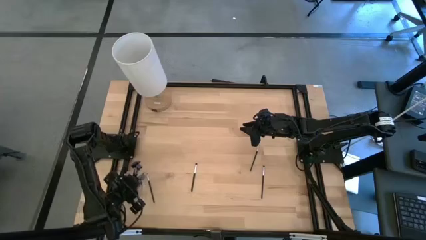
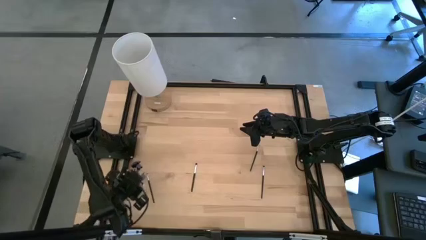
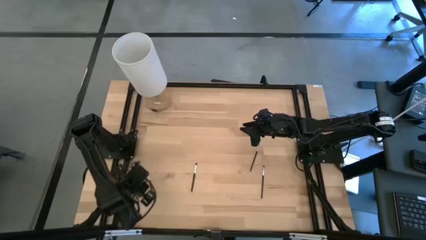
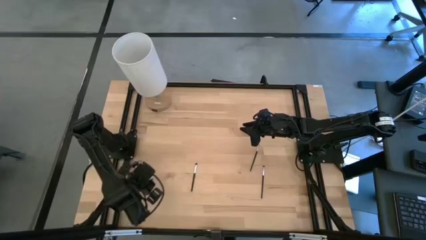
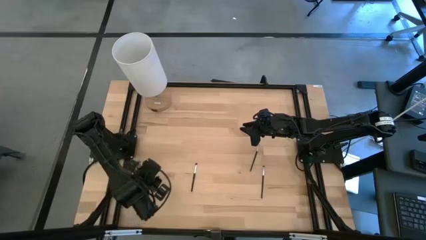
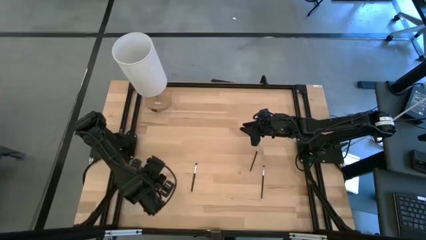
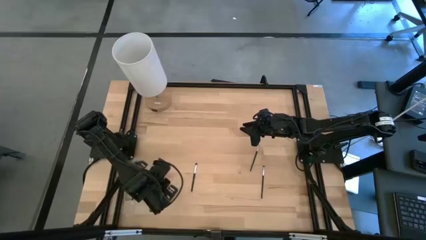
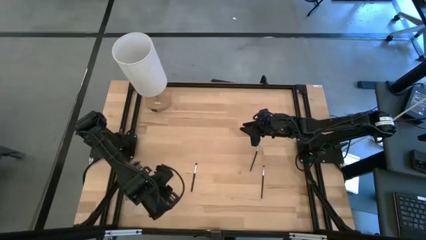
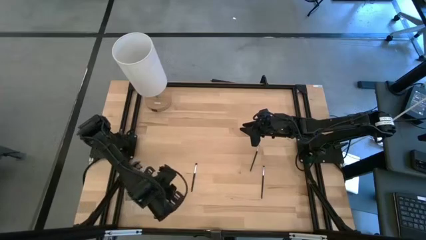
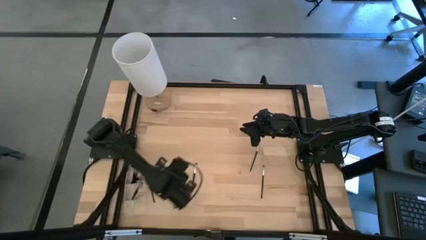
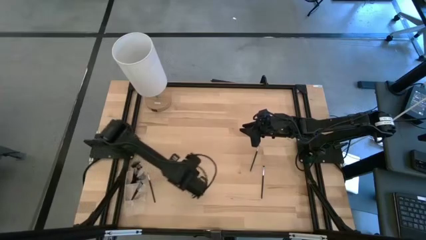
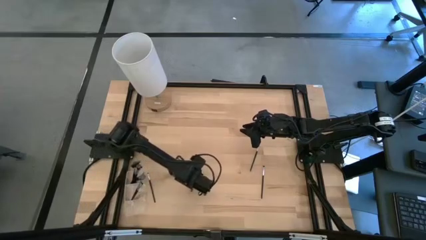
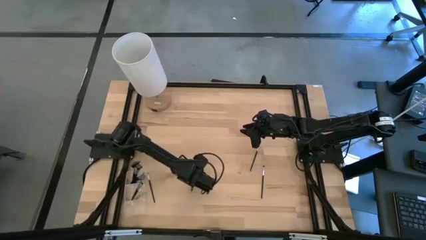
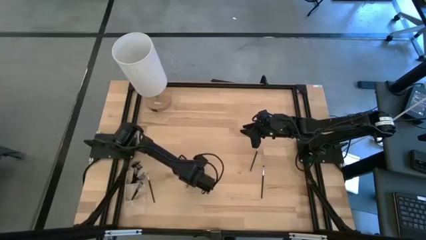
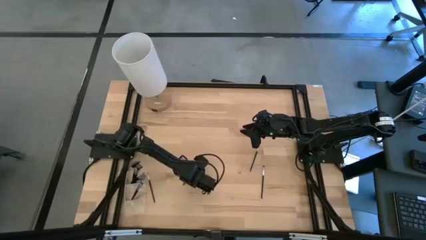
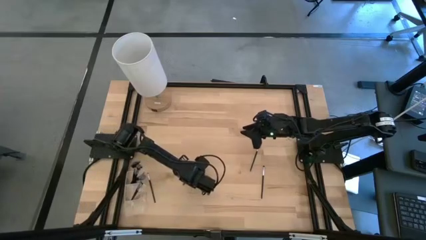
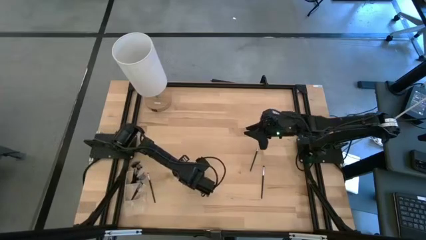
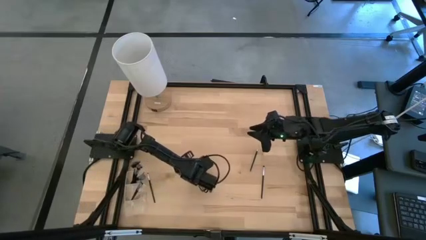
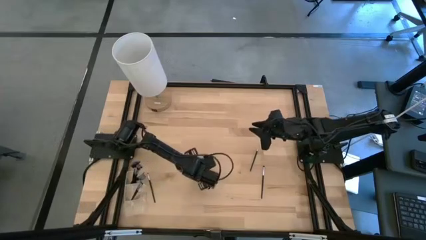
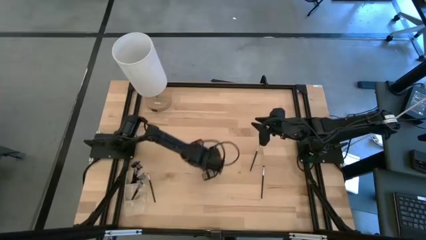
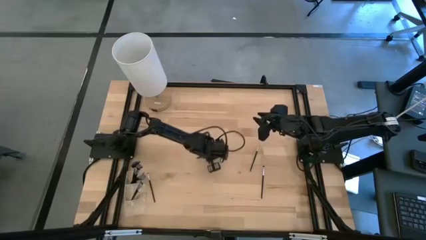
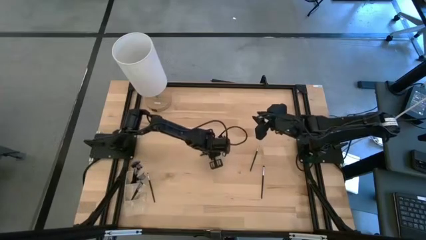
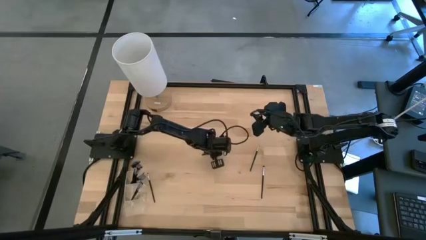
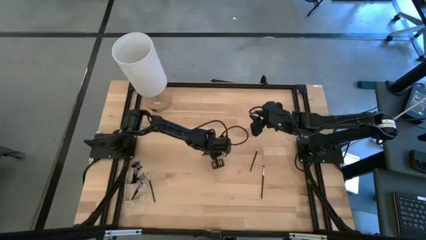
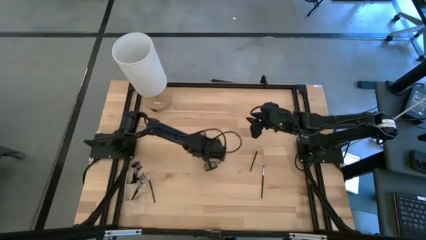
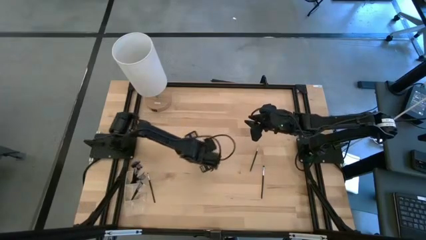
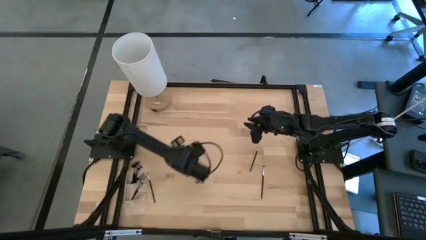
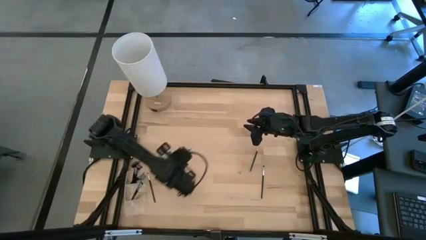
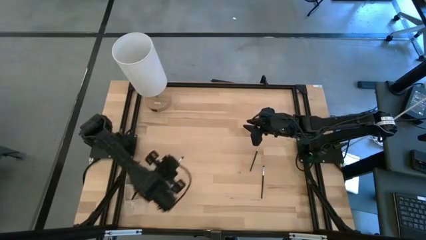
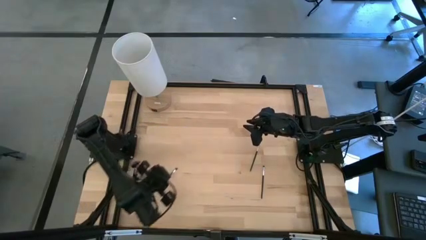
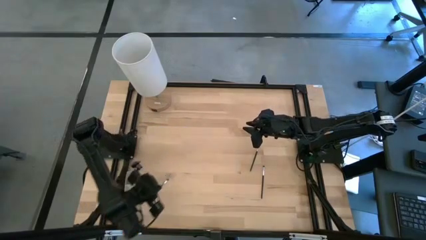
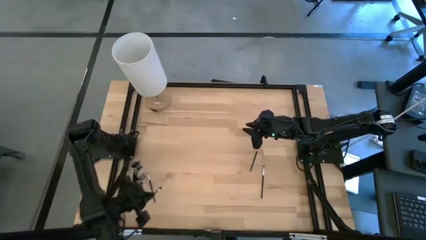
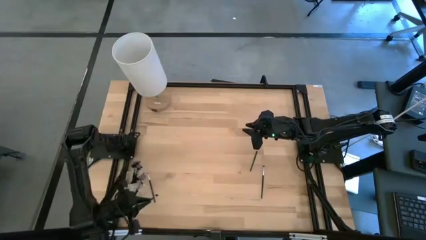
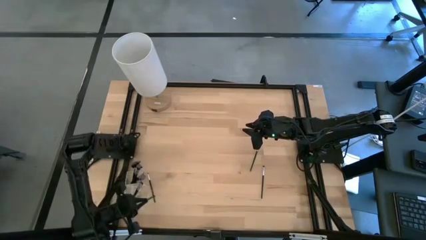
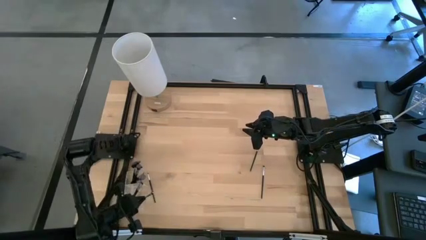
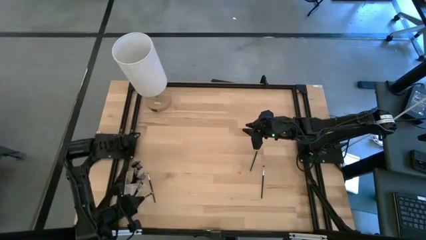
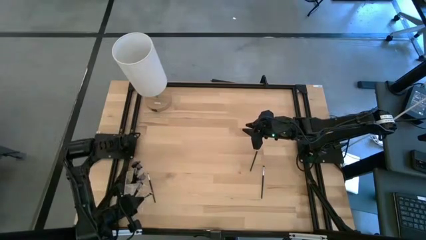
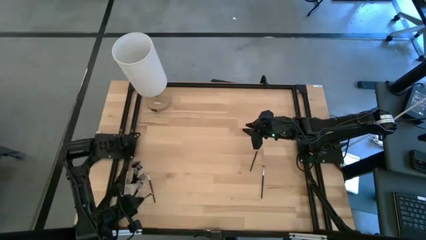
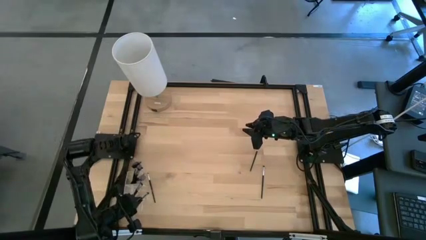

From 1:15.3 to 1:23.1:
Task: Pick & Place Makeup Supplies
Put the makeup brush into the transparent organizer

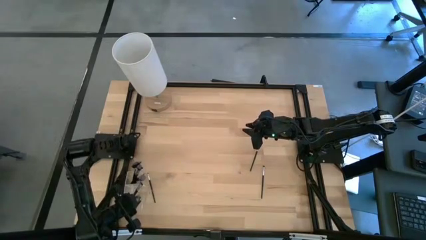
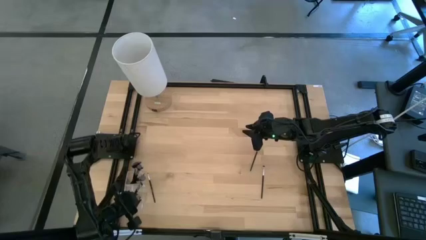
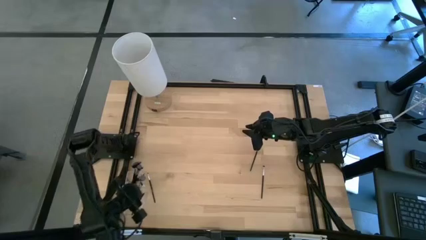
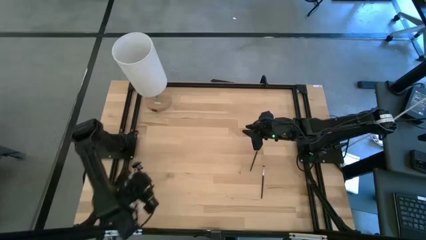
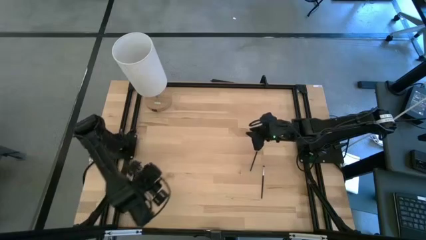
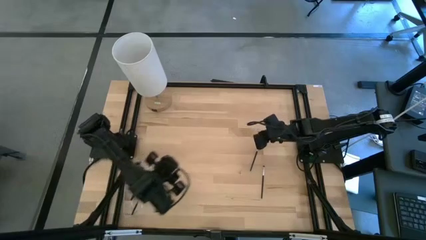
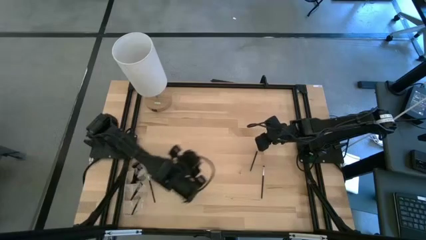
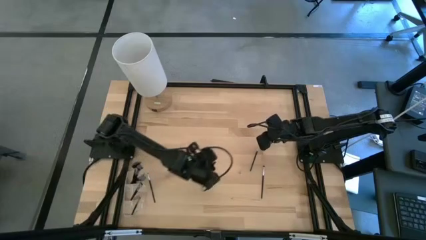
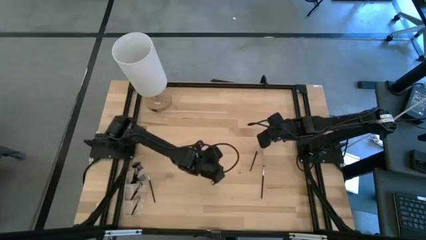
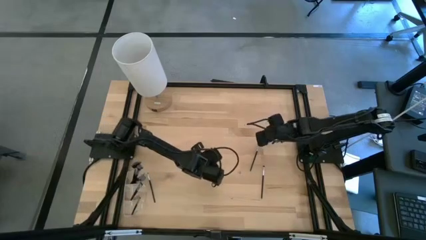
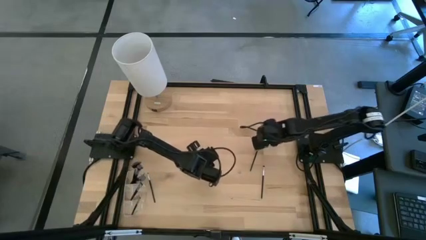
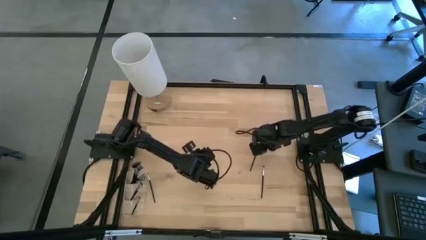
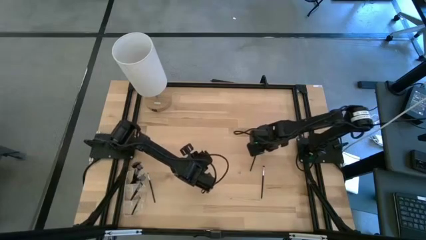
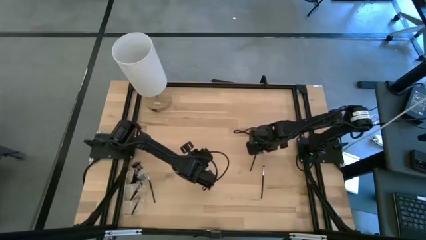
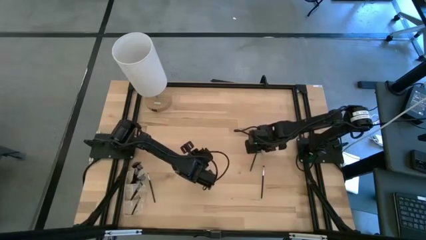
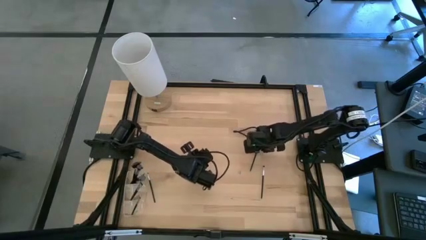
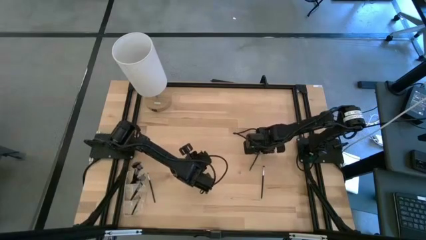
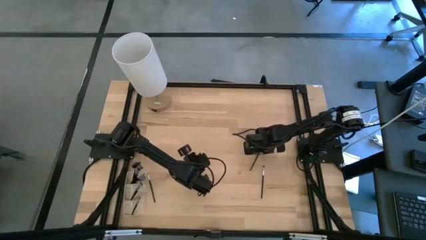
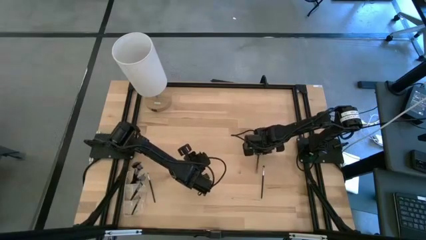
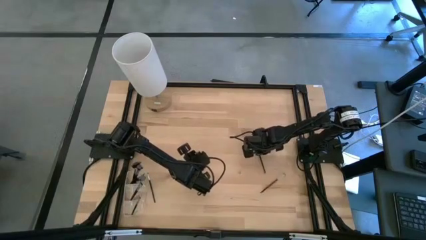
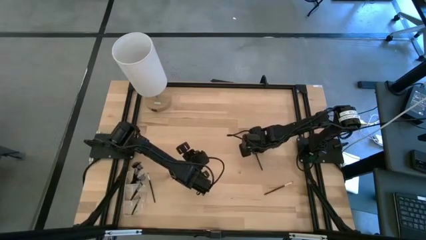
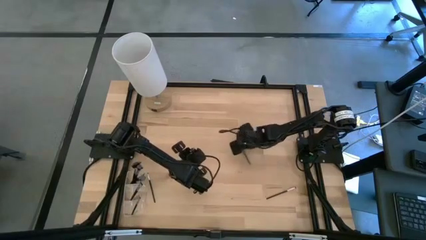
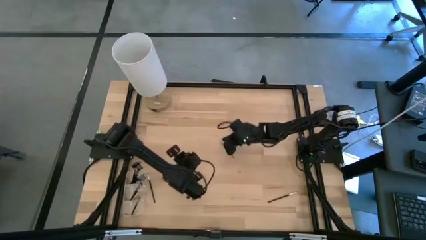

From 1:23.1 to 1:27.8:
Put the top makeup brush into the transparent organizer
